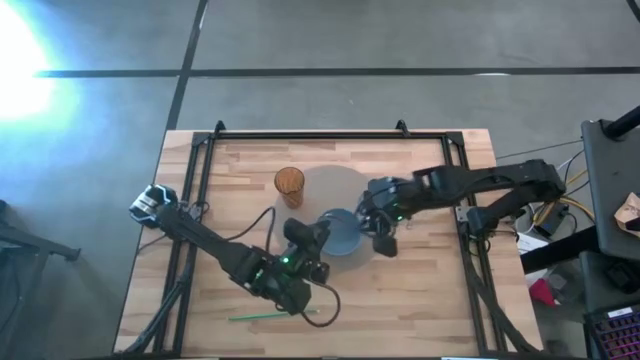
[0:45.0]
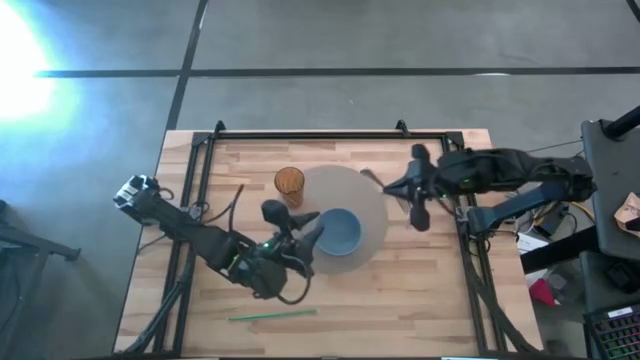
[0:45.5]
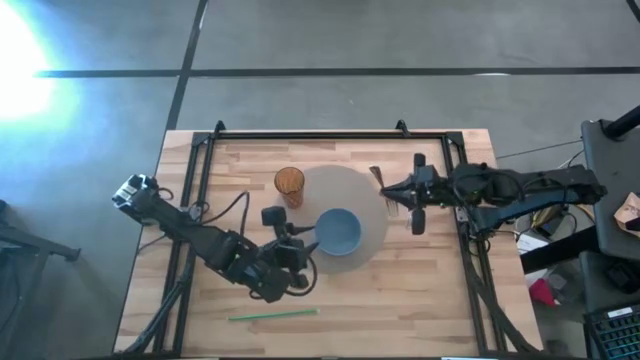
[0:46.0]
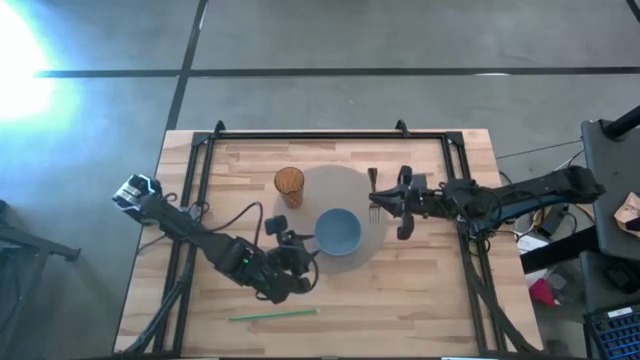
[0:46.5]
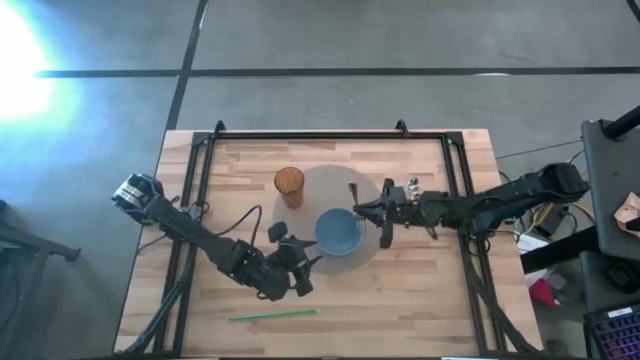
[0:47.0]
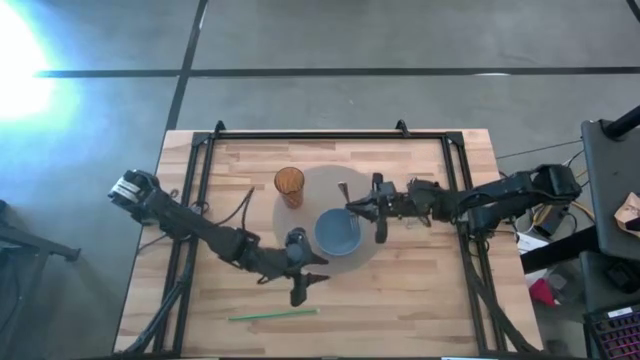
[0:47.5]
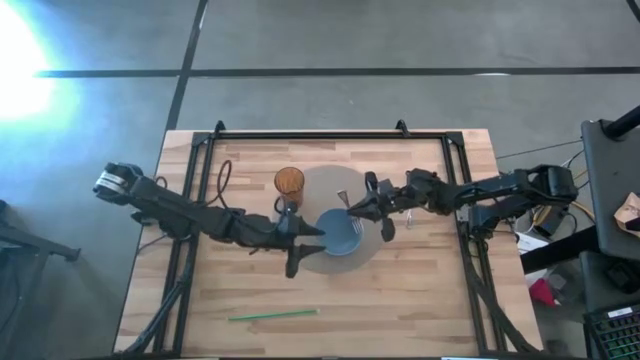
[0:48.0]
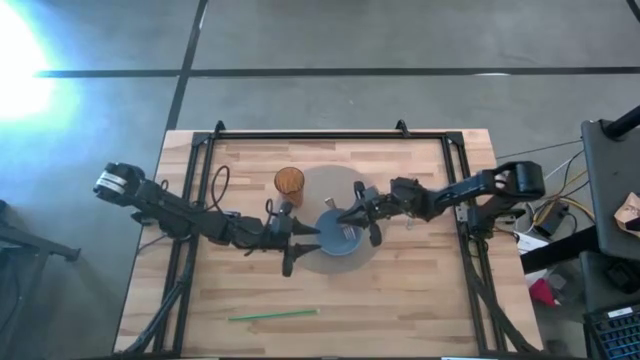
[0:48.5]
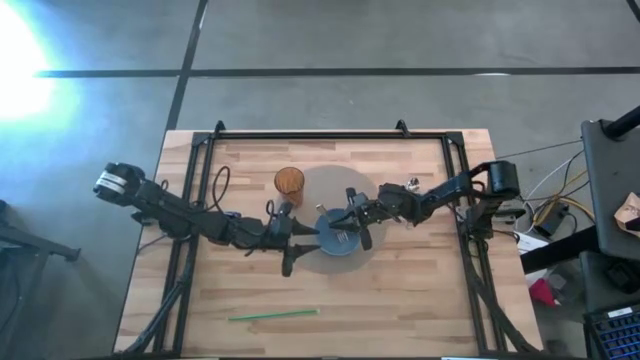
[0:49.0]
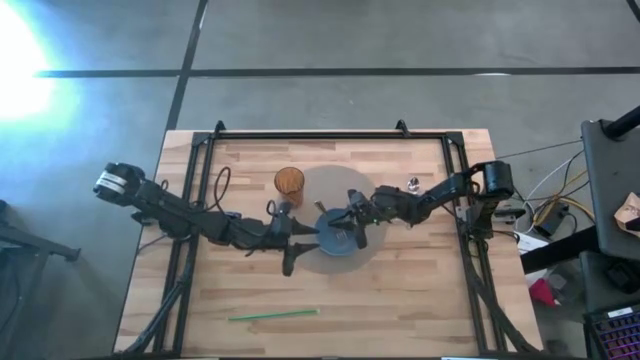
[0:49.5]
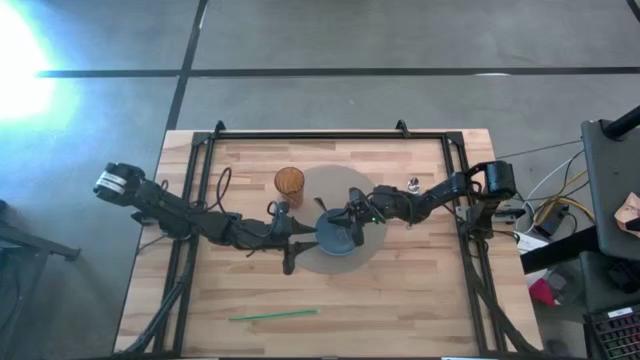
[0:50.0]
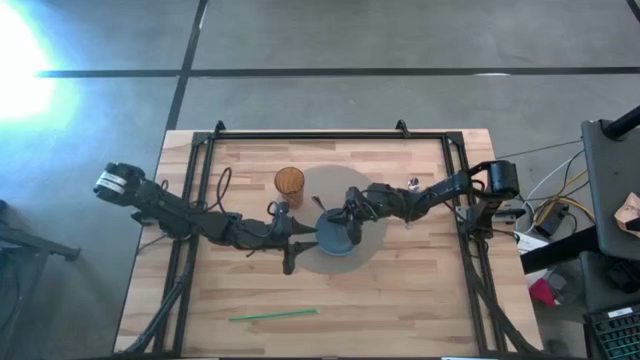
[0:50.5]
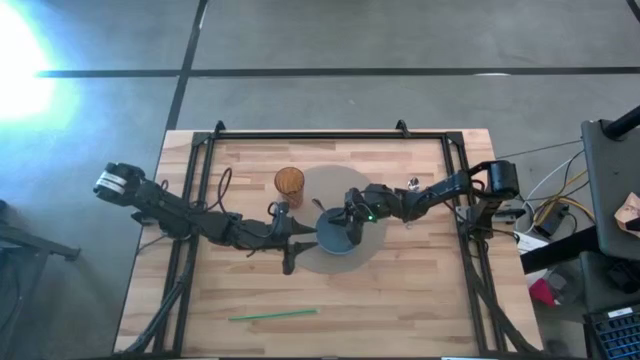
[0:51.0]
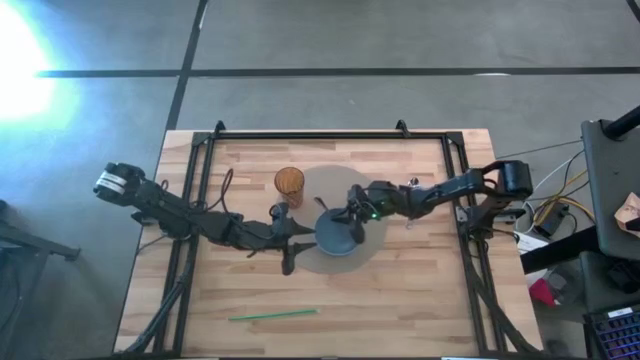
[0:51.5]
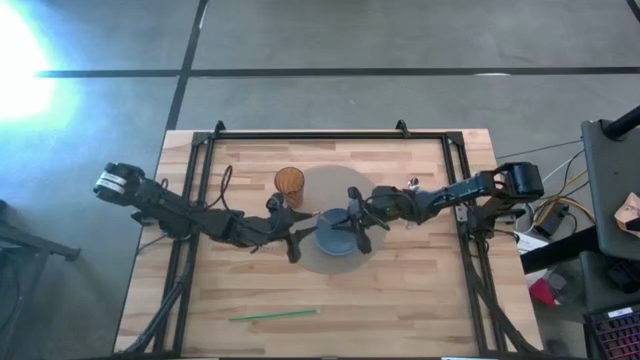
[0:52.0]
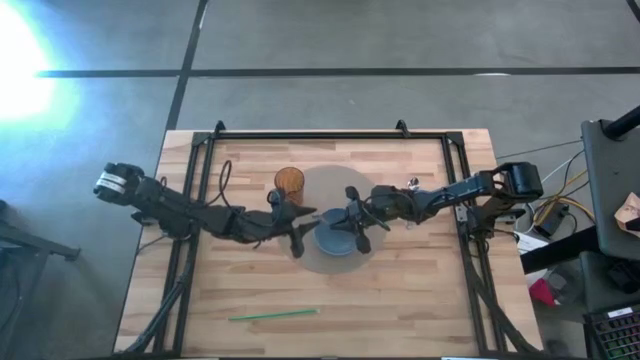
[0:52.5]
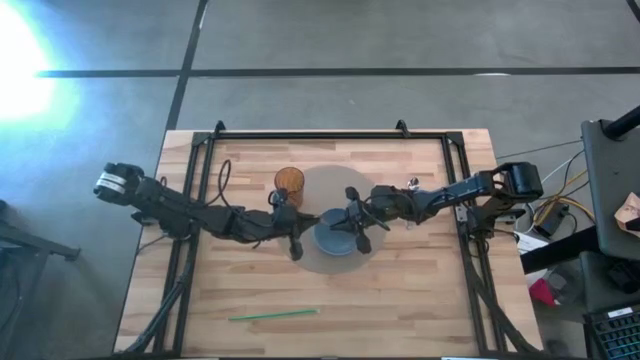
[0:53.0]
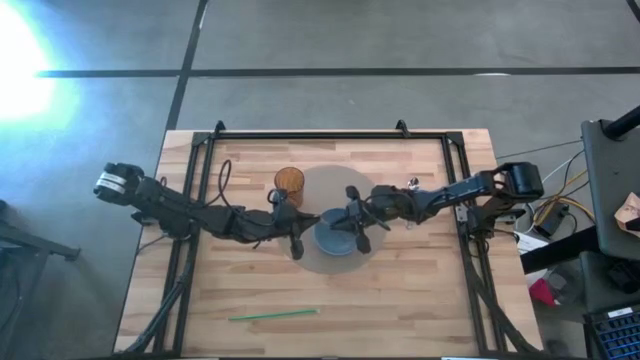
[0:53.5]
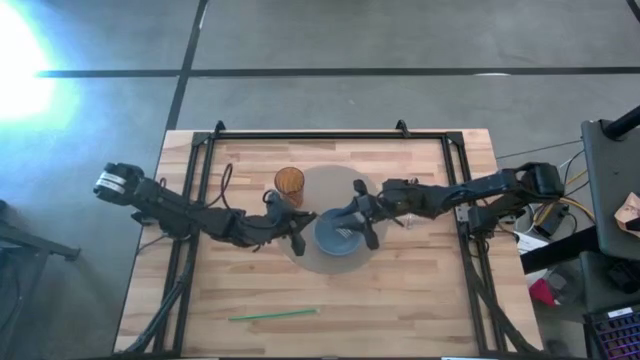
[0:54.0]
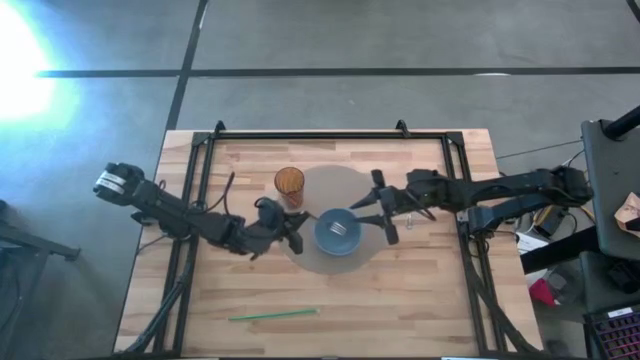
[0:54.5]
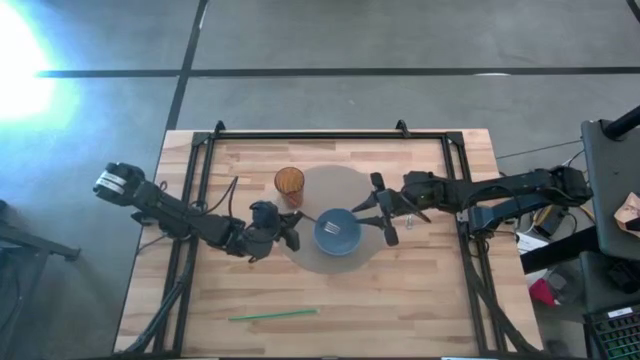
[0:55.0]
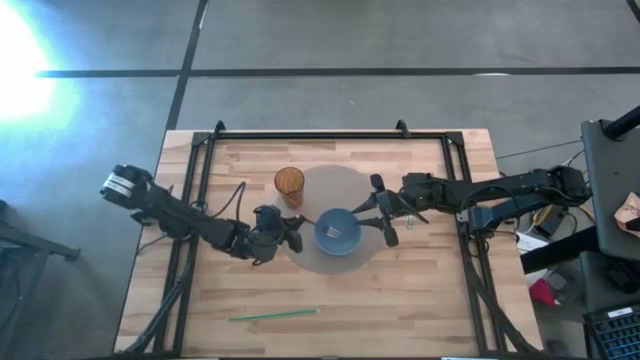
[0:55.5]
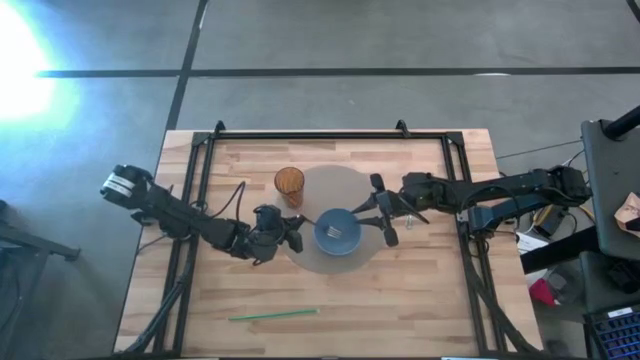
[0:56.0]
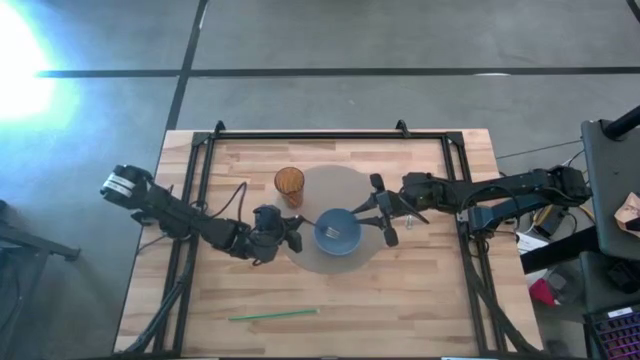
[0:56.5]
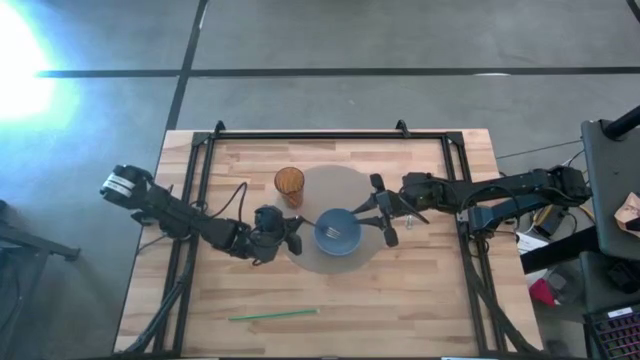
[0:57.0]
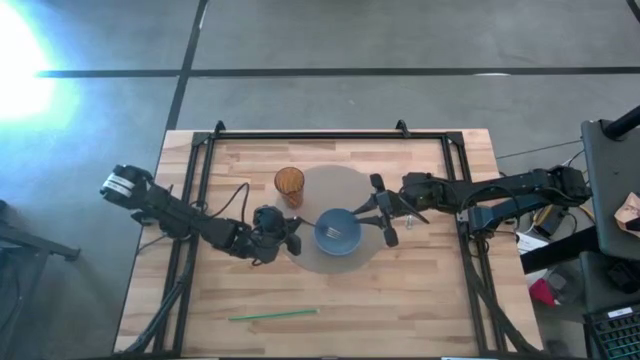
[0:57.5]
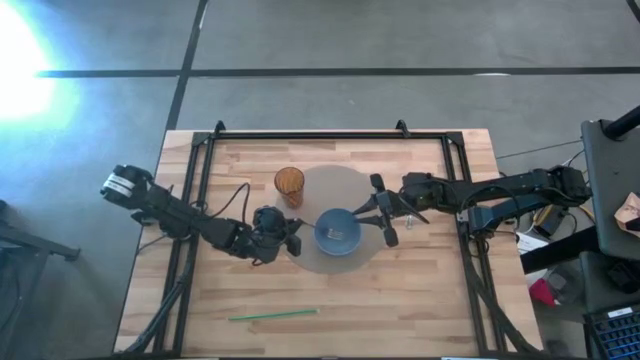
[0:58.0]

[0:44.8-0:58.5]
Task: Pick & Place Utensil
Put the fork into the bowl

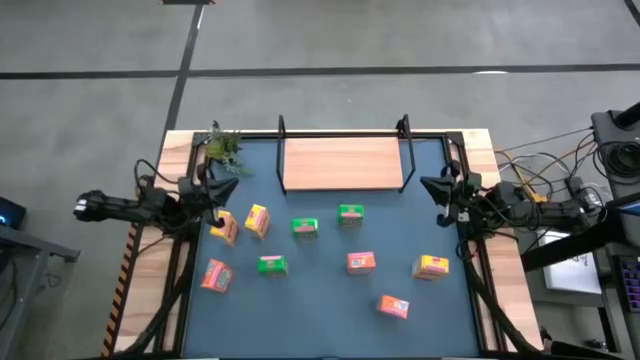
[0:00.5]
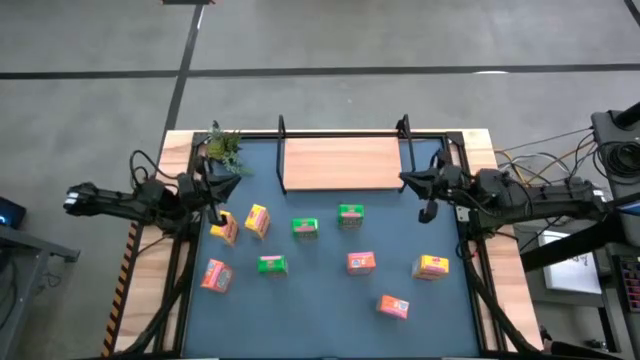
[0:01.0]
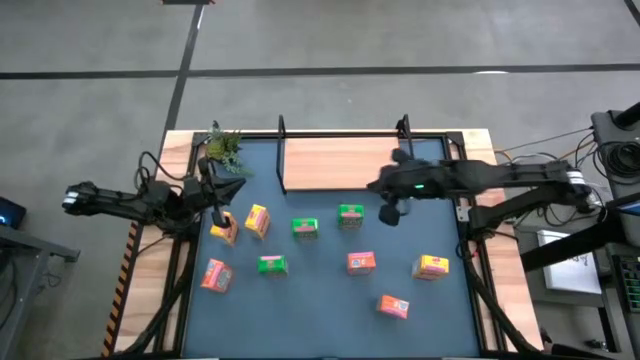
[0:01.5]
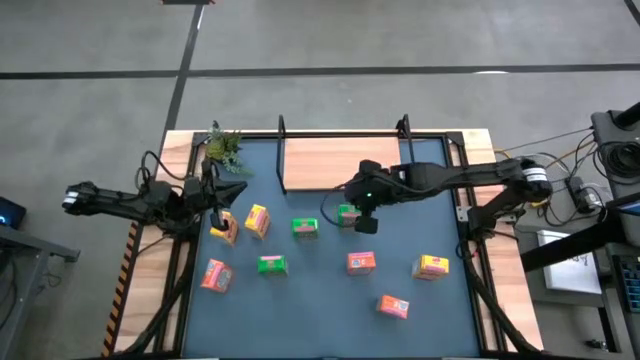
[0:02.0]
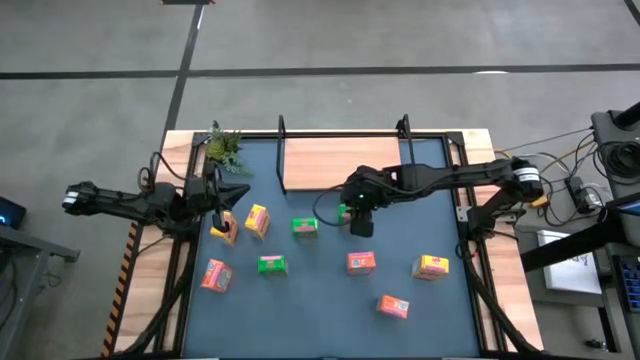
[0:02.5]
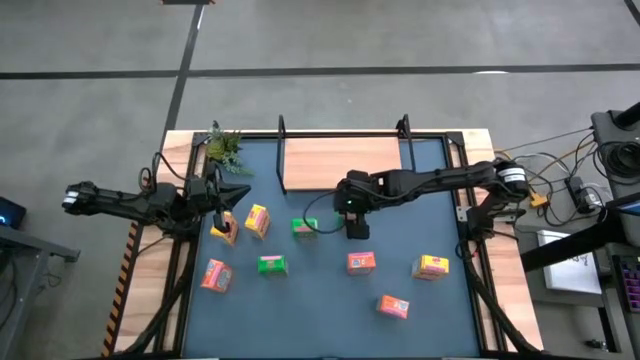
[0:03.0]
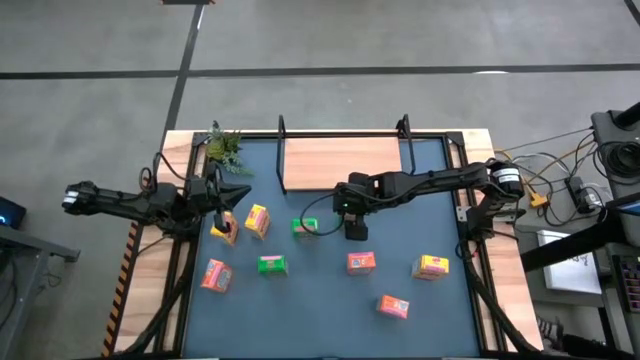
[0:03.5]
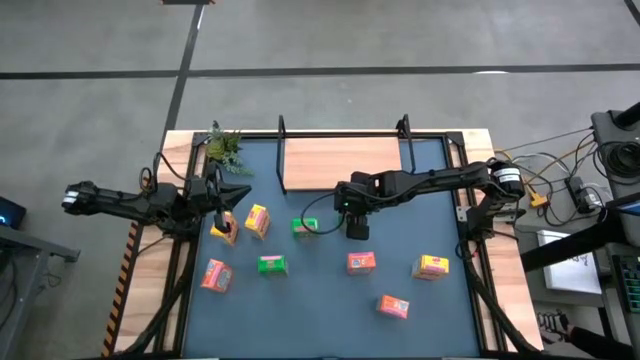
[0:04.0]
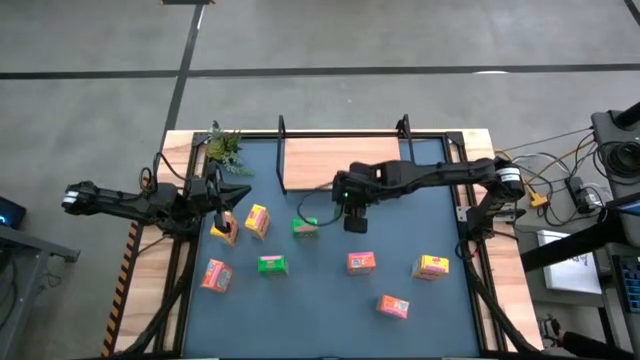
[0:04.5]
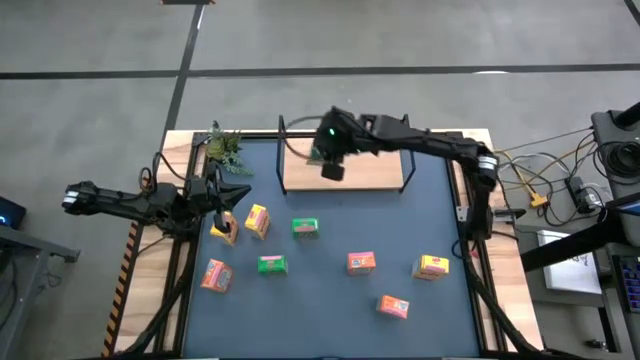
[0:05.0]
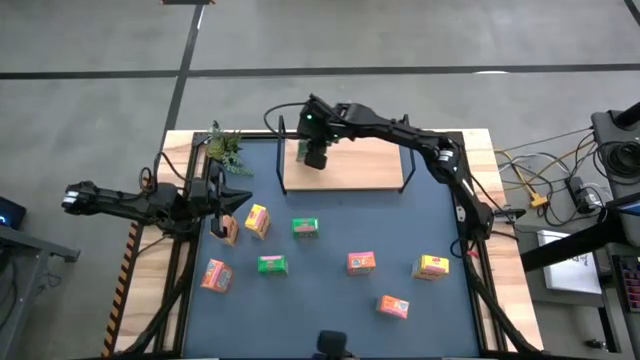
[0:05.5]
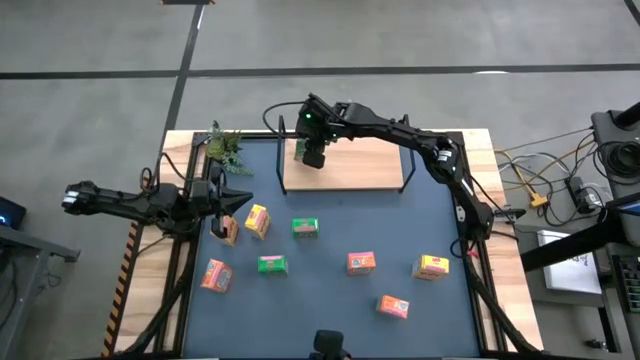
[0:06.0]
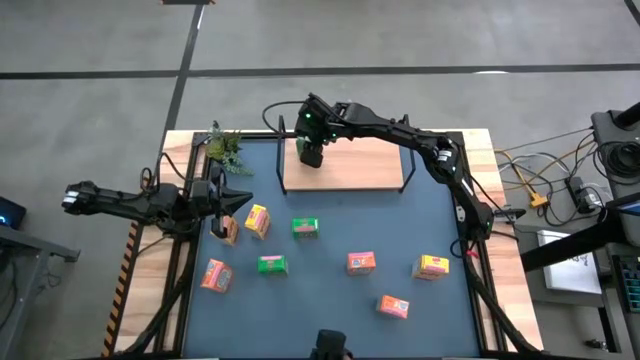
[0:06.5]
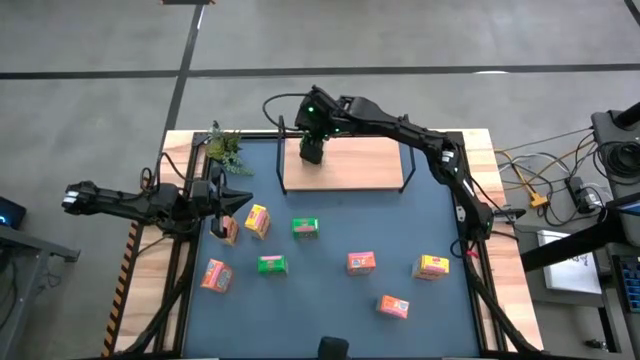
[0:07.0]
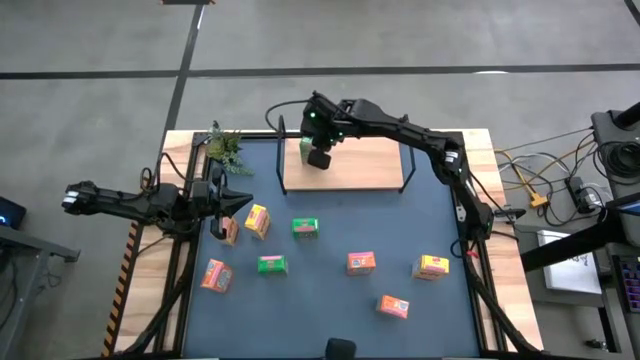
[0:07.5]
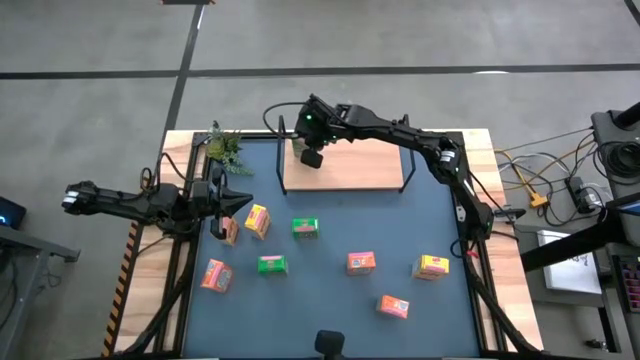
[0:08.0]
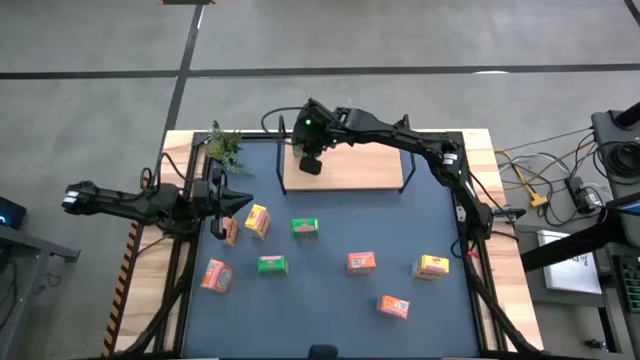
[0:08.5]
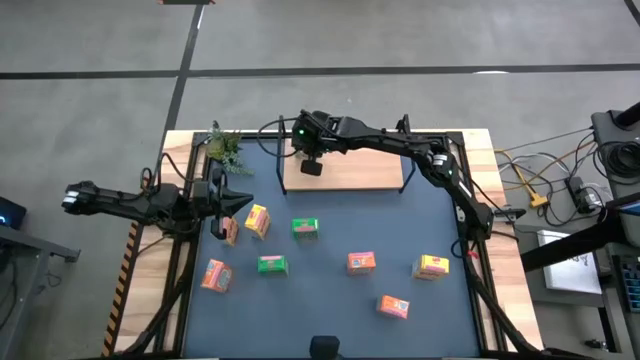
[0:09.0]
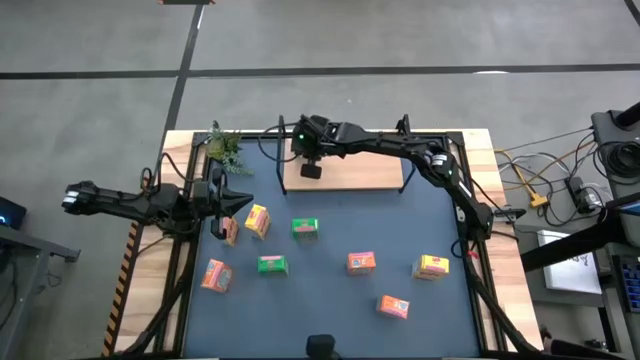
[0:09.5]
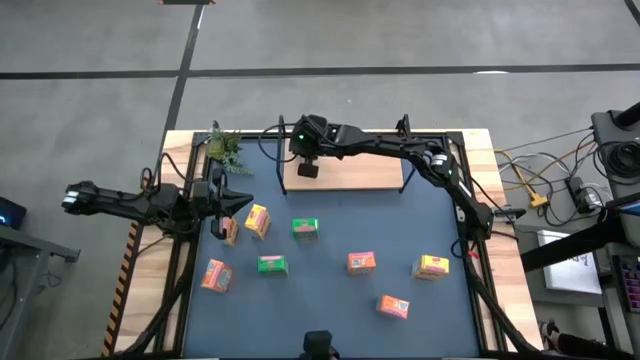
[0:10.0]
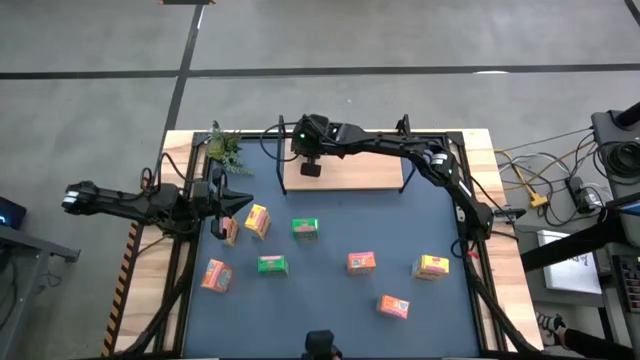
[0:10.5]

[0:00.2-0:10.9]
Task: Stack cereal on shelf
Stack the right green cereal box on the shelf
